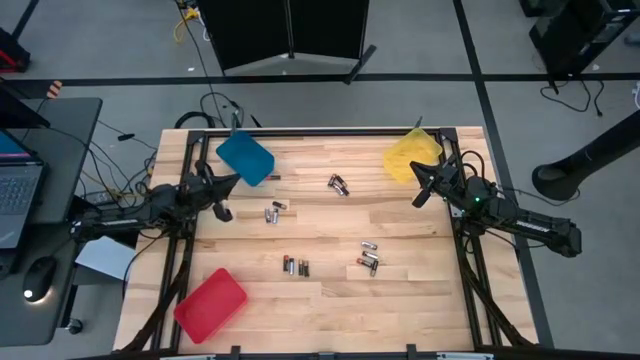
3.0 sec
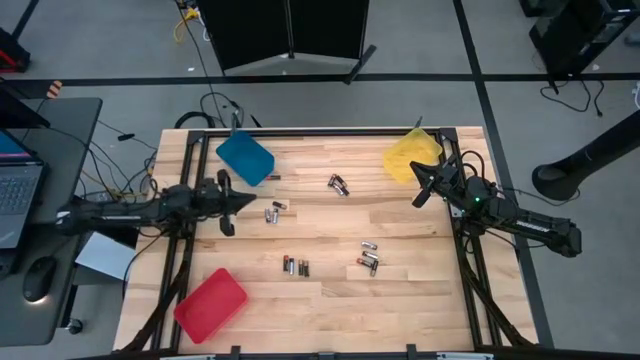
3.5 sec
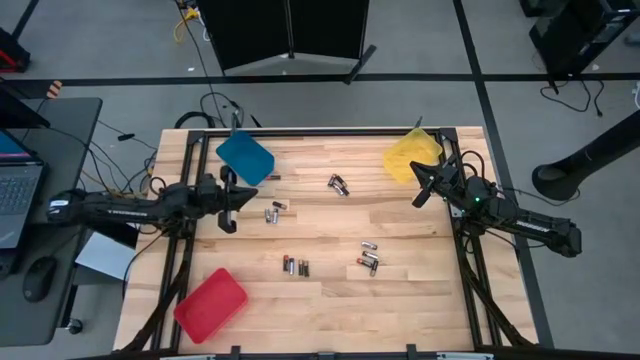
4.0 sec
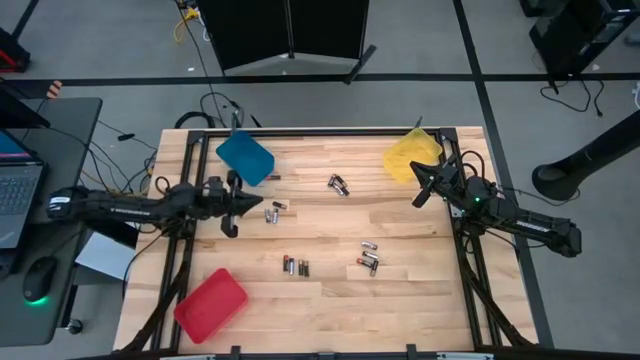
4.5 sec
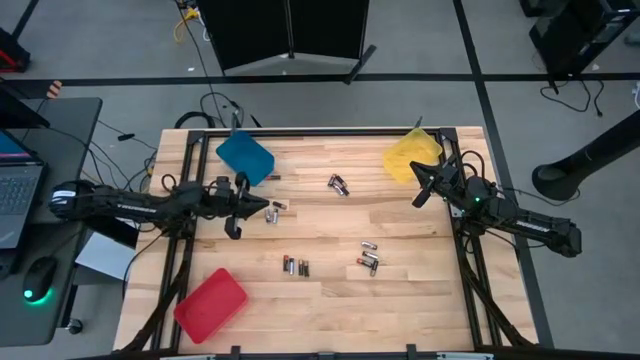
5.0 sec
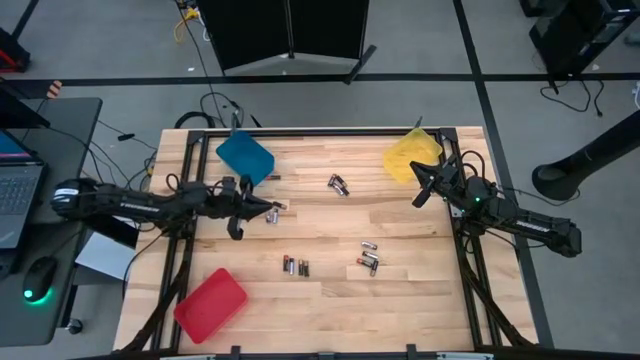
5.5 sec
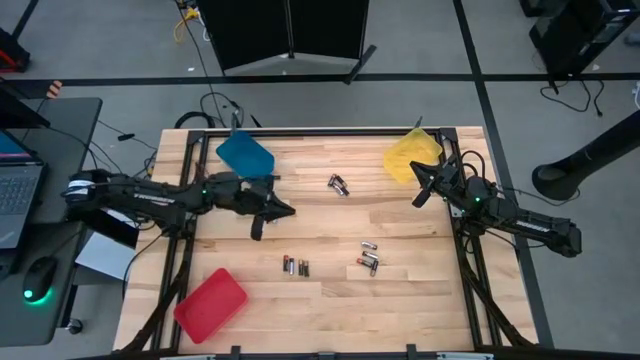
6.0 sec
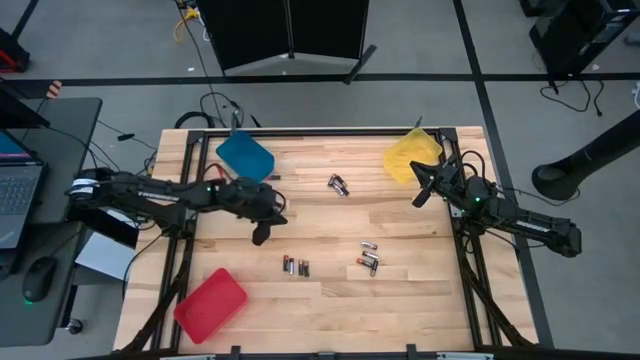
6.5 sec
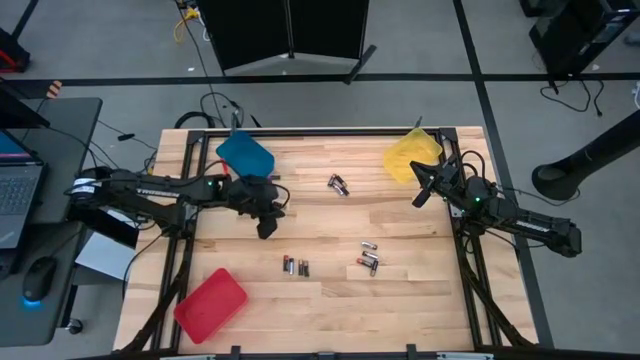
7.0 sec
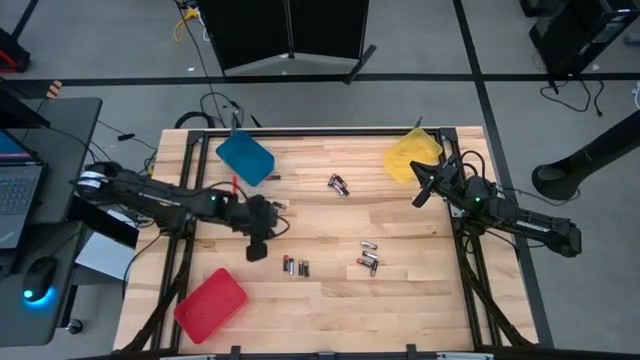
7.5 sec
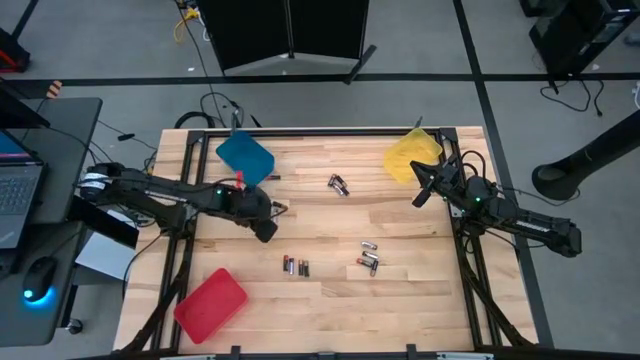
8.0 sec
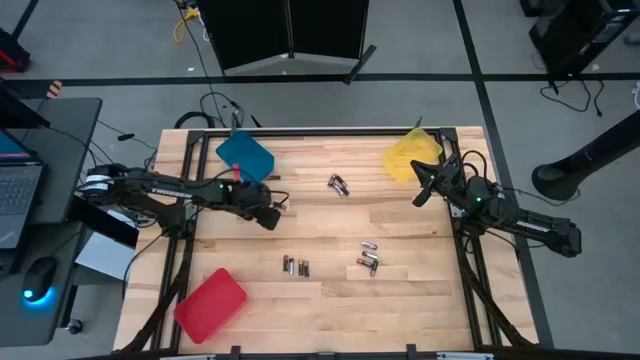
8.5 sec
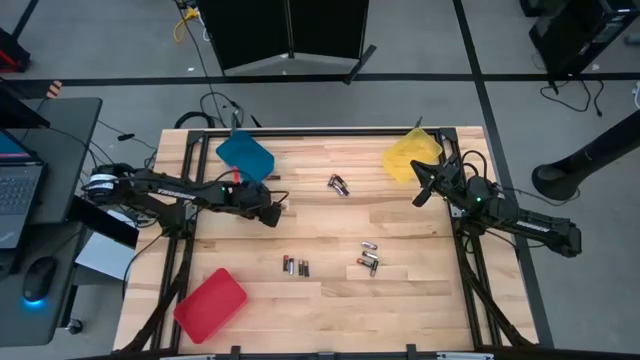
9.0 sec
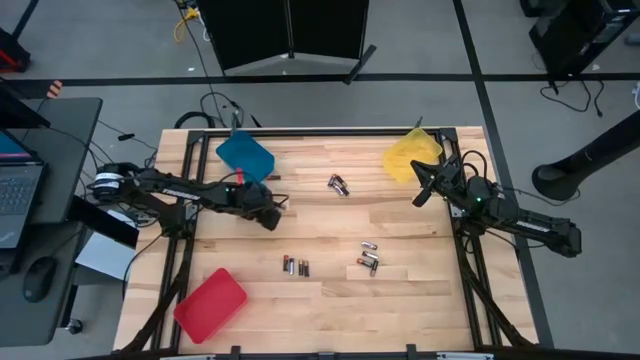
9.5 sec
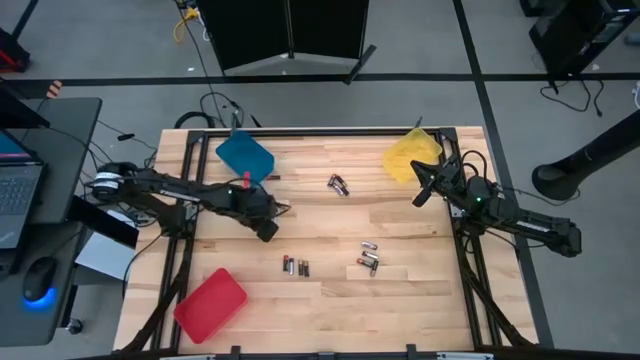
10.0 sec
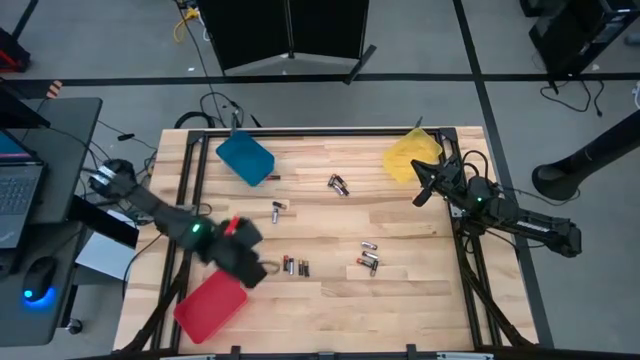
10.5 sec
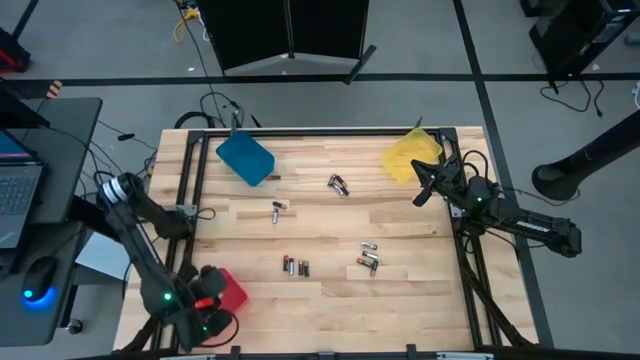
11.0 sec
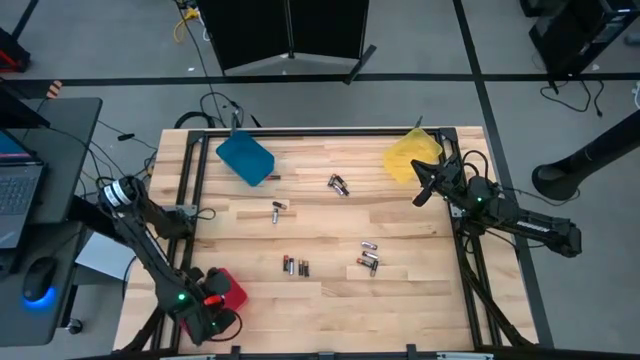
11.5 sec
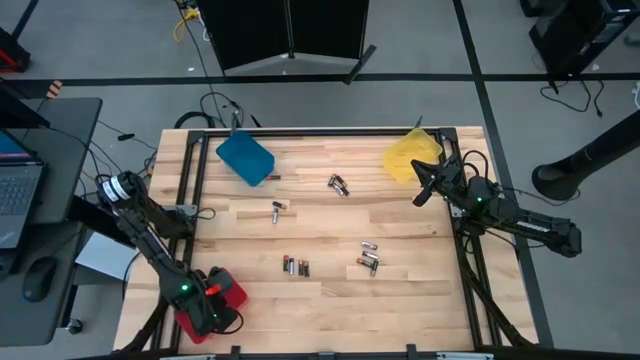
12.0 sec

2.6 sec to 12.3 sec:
Task: Sort batteries
Put the black silver battery into the red bin

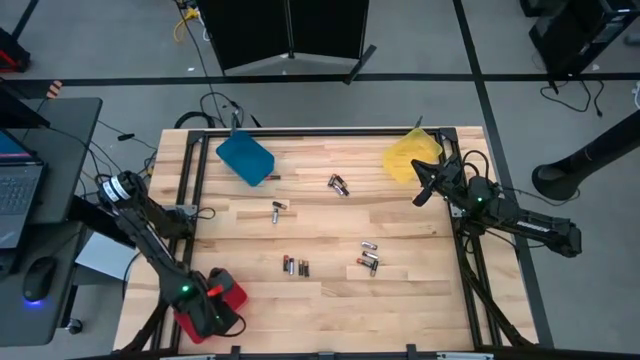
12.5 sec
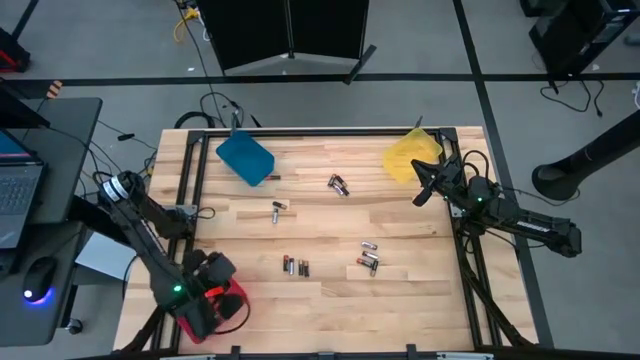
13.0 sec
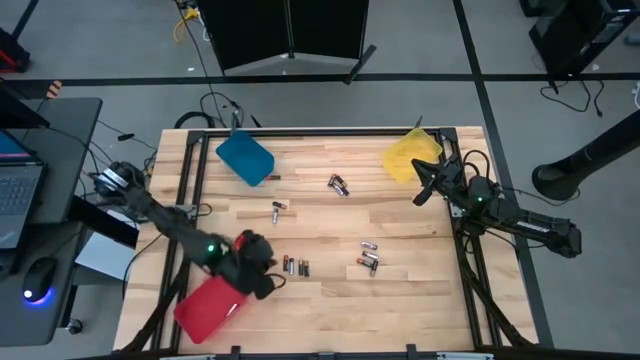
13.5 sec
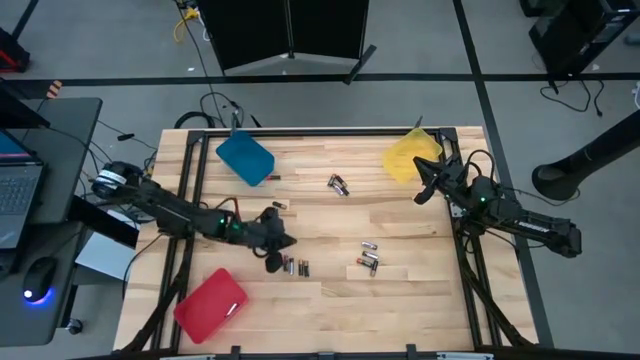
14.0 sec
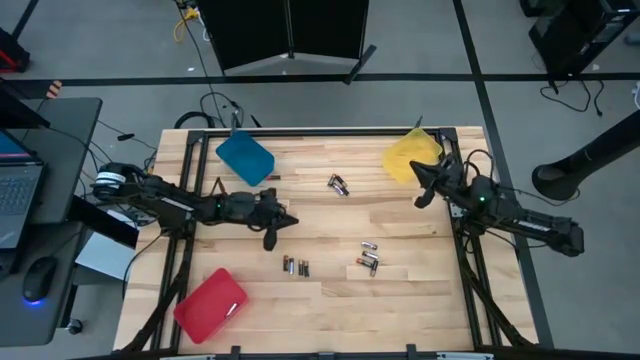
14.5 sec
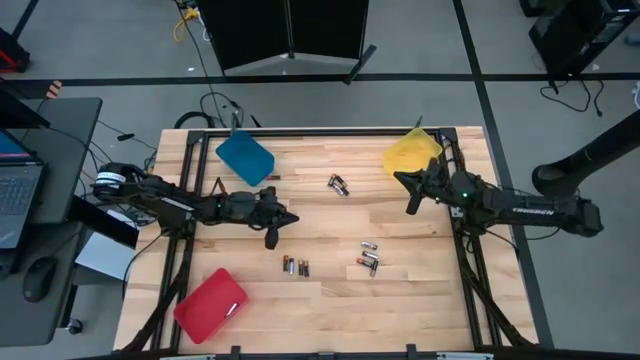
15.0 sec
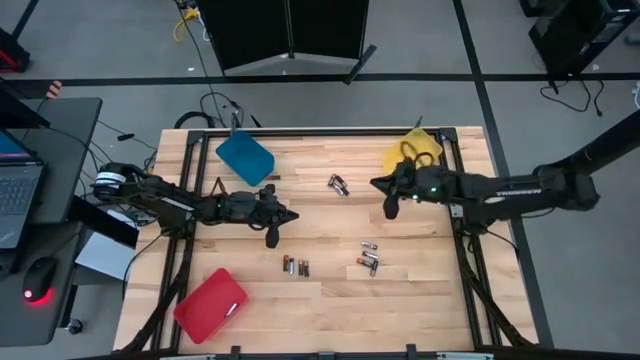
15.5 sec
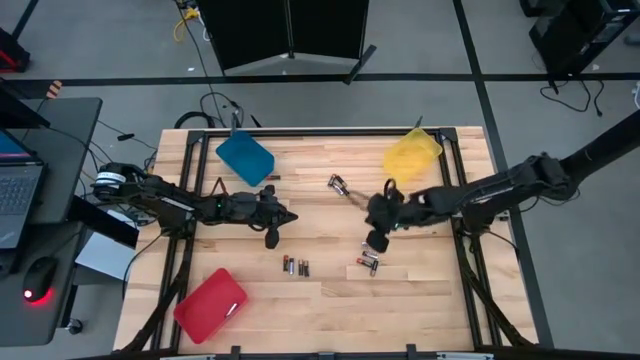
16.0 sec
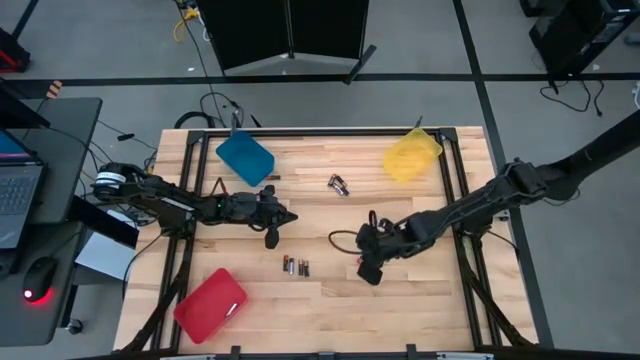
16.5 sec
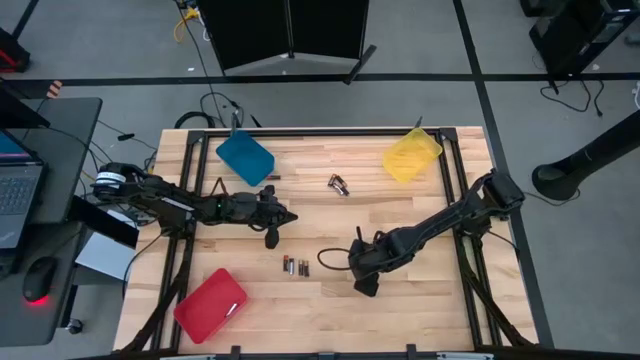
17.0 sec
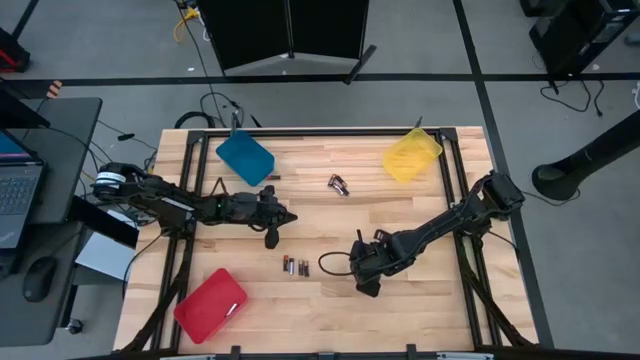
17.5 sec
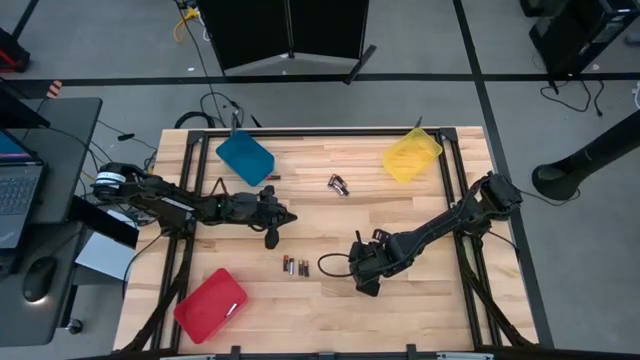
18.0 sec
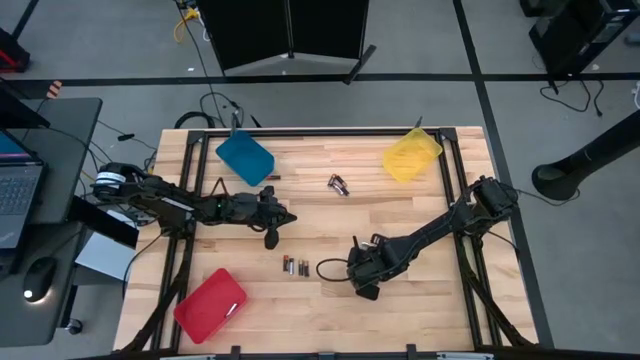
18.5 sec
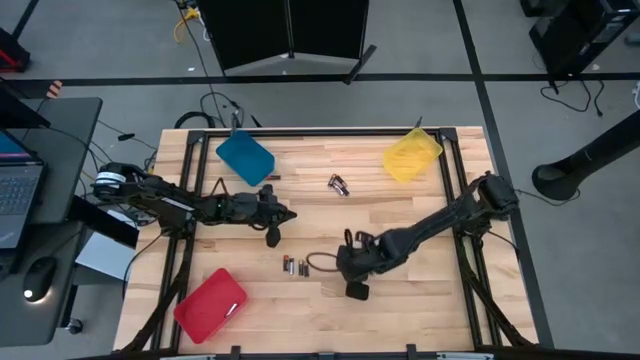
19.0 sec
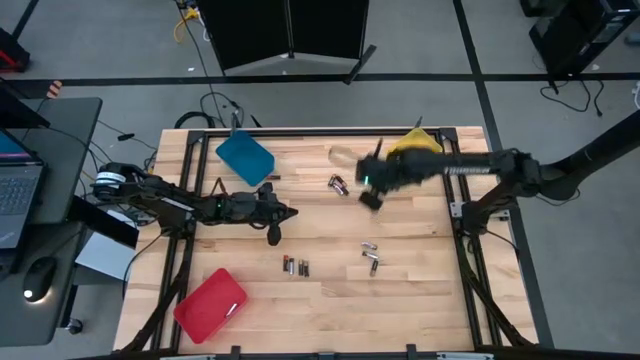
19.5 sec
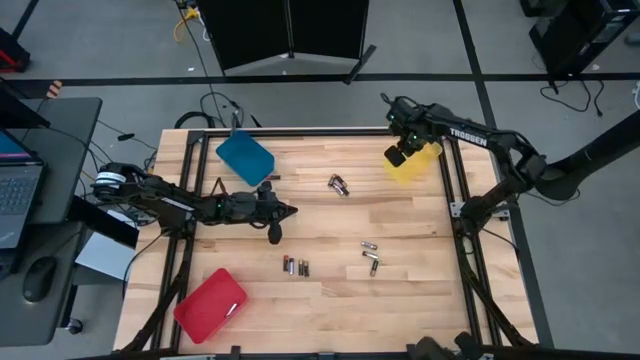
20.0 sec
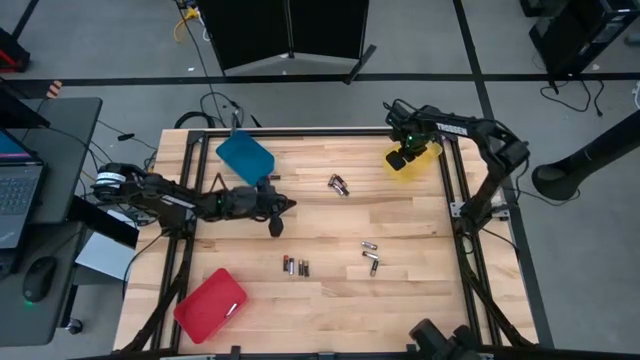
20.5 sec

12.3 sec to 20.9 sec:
Put the black orange battery into the yellow bin

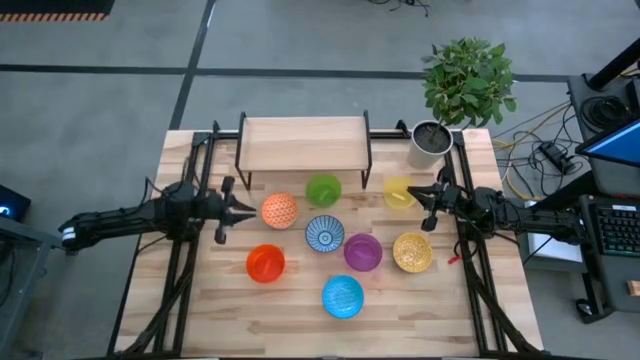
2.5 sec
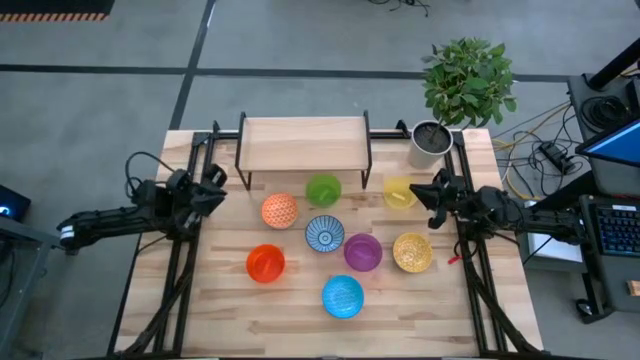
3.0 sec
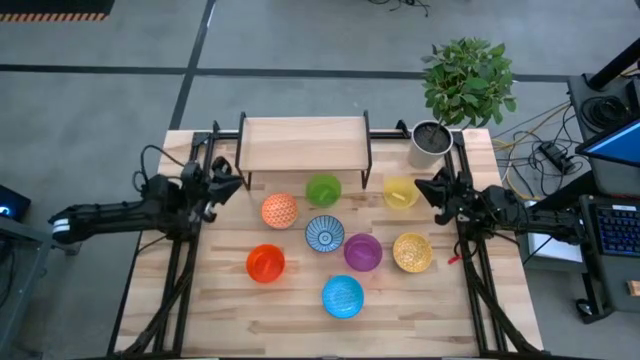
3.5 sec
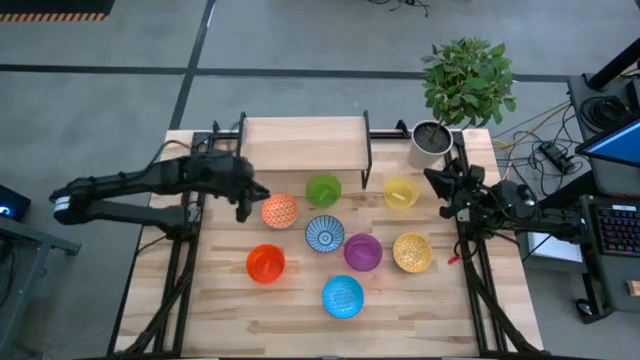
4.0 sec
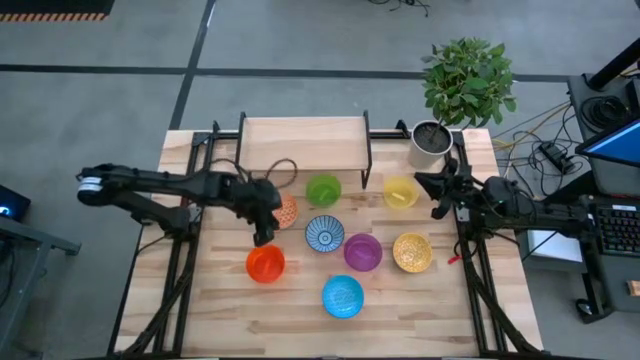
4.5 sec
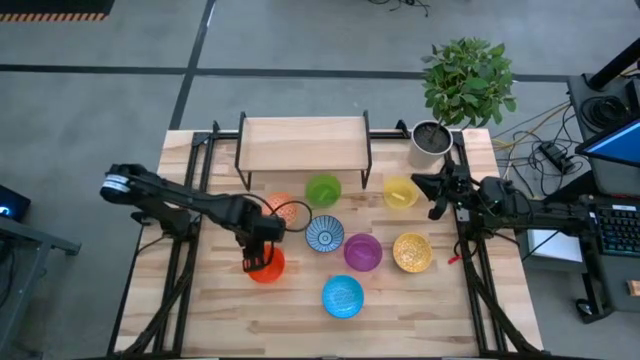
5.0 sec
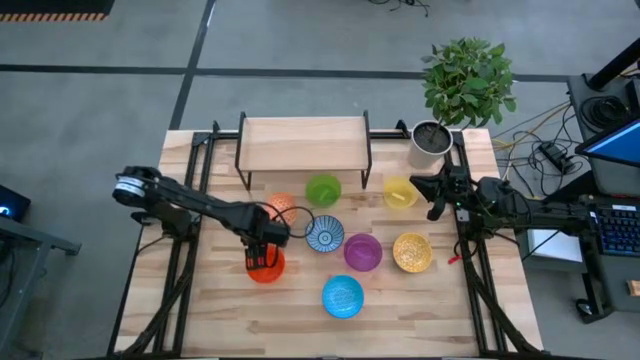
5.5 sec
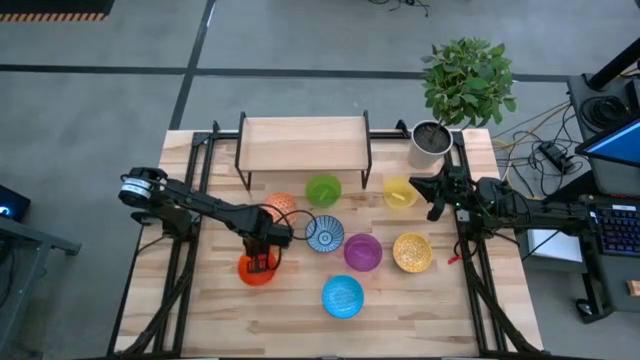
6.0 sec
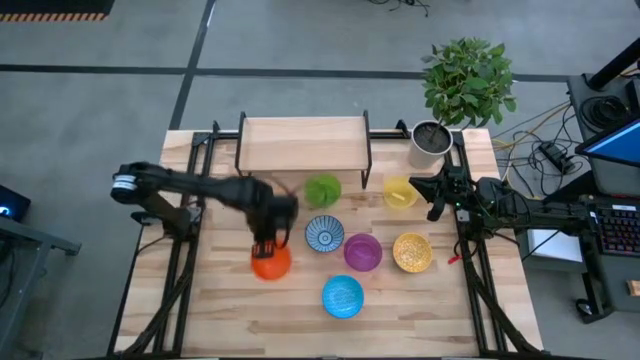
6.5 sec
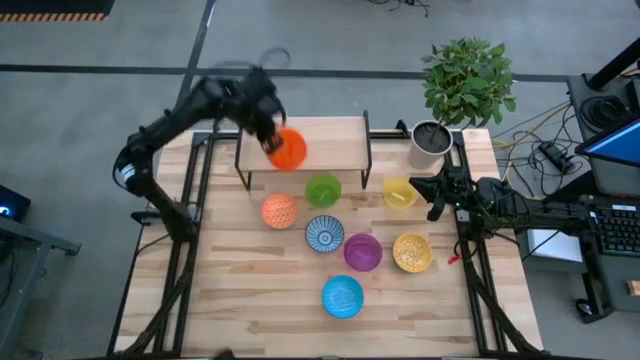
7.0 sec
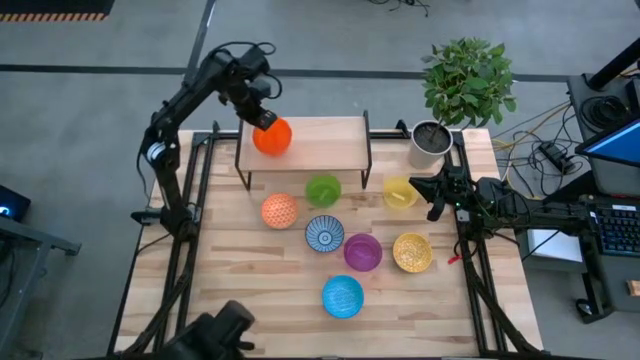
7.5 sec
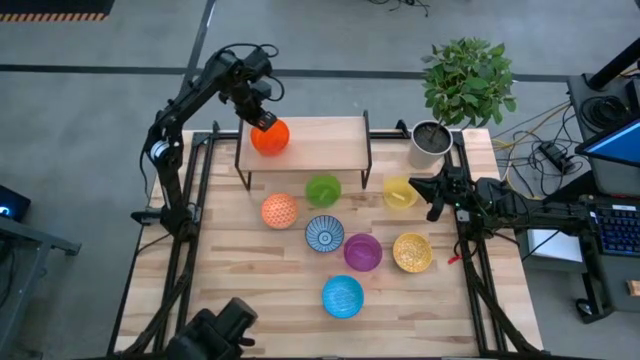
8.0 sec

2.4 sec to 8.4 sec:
Task: Place and stack bowls onto a shelf
Put the transparent orange bowl on the shelf
